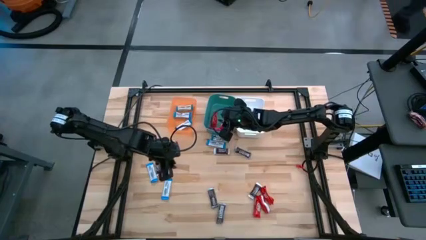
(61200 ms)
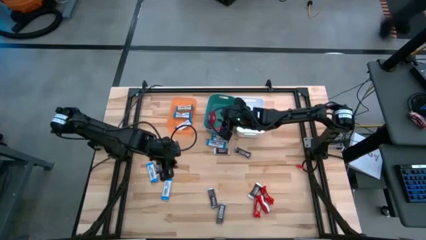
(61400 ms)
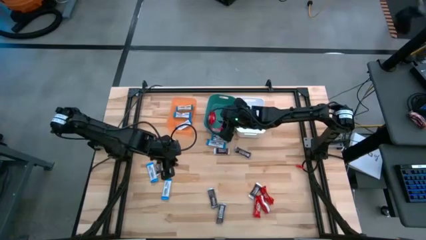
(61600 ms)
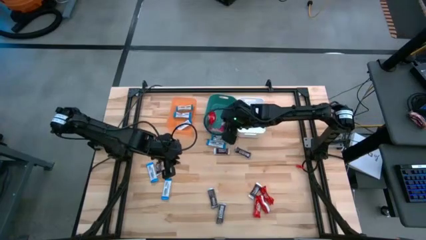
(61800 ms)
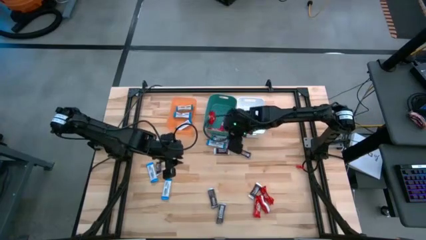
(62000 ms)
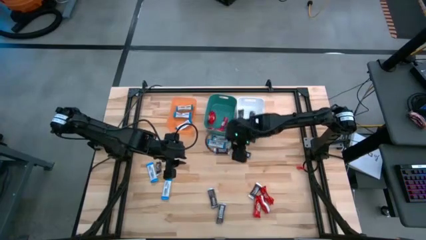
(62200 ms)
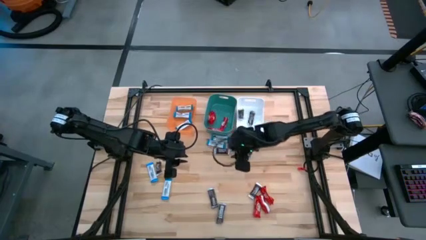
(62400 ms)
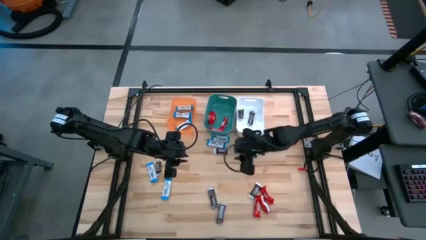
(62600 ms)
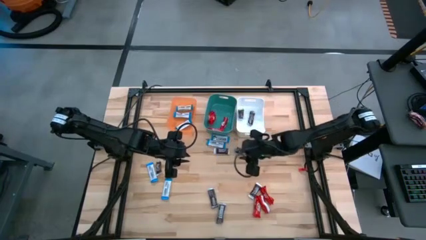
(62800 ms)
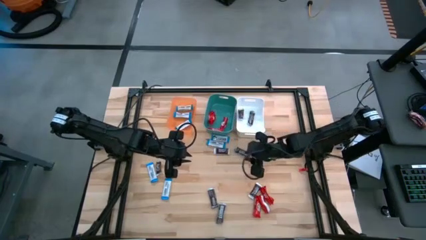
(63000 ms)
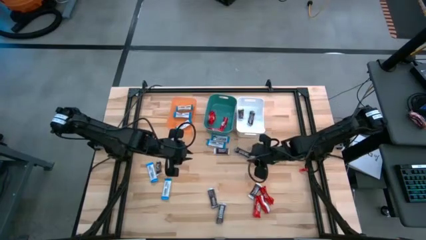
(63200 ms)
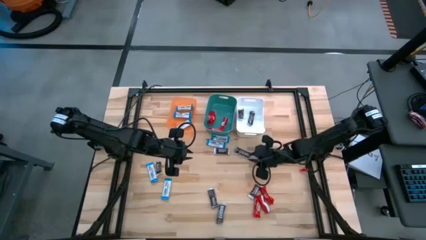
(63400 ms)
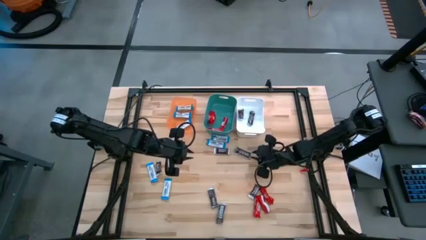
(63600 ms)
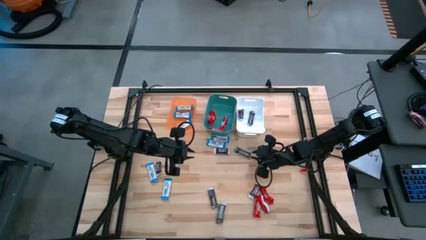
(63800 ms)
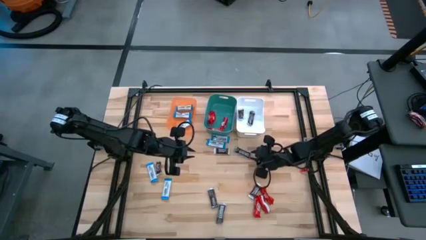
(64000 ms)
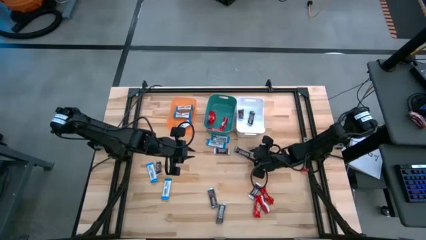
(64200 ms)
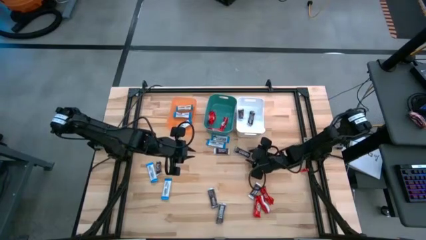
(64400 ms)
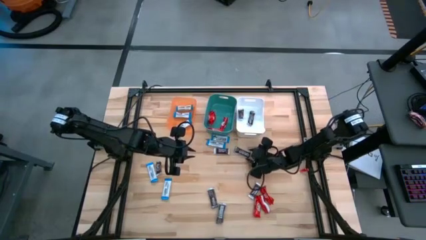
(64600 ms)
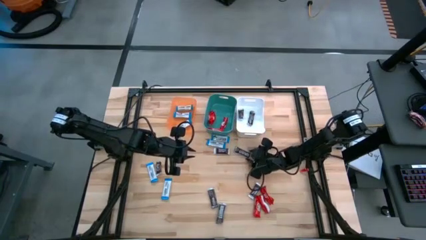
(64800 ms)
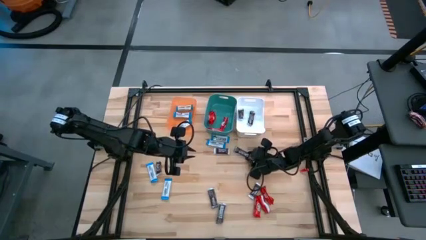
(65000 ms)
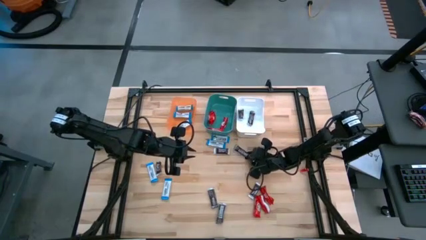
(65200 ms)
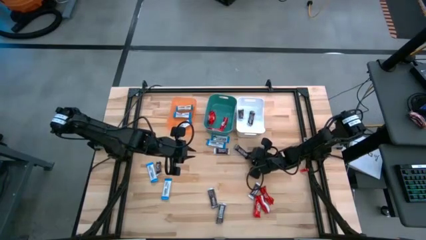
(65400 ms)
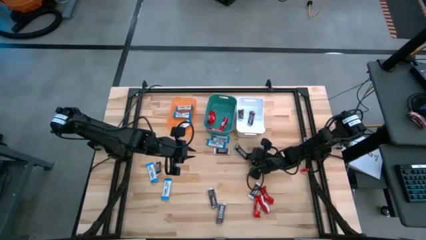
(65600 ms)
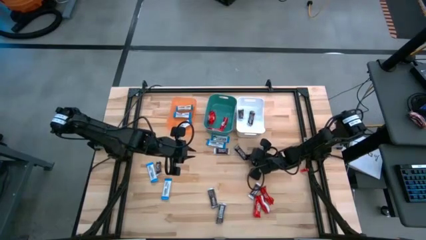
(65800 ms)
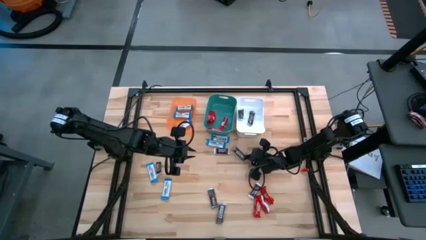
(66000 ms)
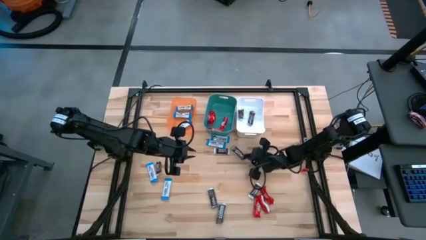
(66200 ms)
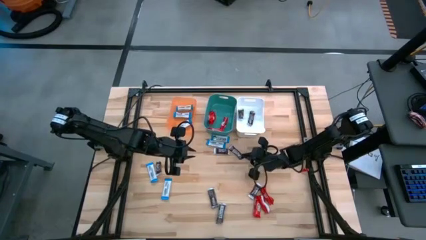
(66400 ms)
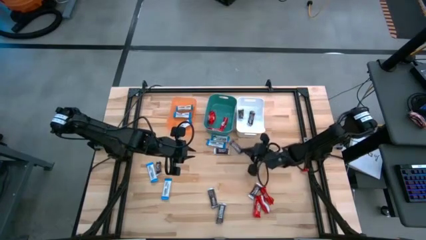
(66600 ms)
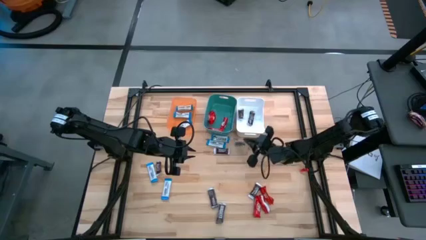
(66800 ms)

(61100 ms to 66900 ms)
Task: Organize candy in baskets
Put the brown chocolate into the white bin

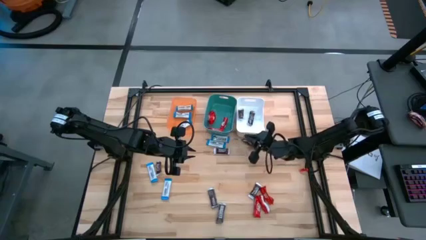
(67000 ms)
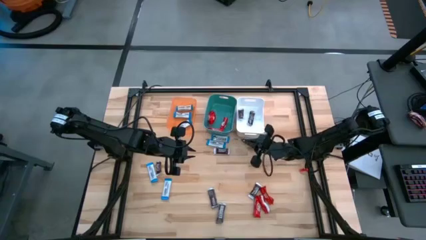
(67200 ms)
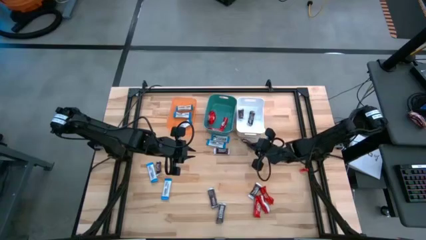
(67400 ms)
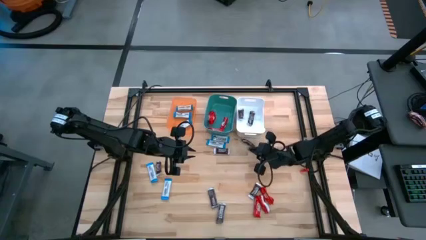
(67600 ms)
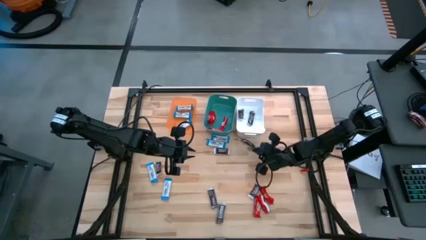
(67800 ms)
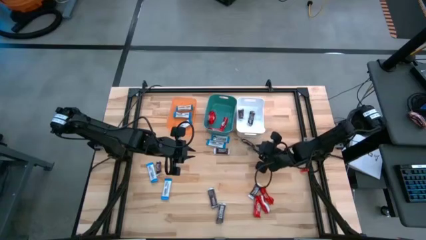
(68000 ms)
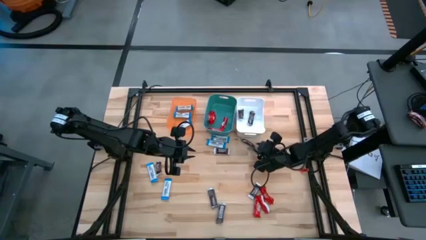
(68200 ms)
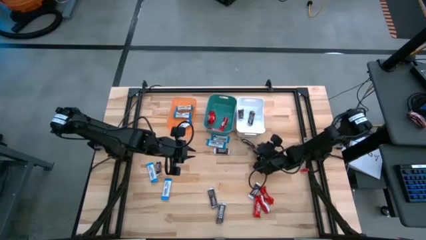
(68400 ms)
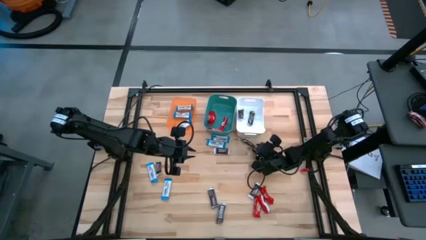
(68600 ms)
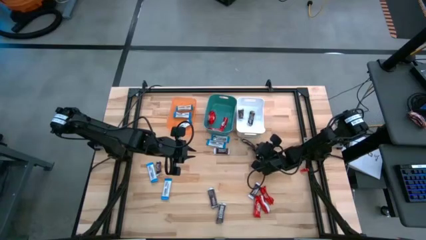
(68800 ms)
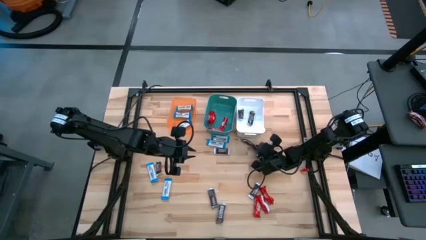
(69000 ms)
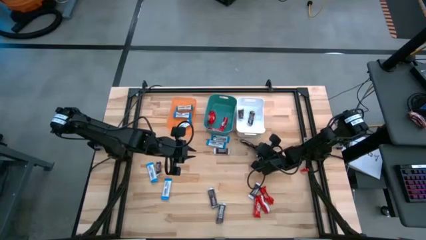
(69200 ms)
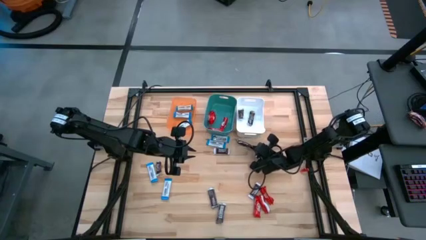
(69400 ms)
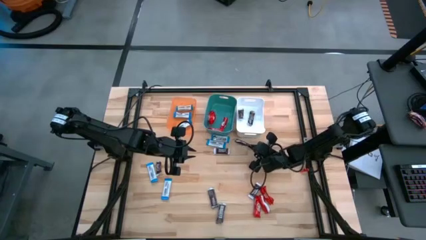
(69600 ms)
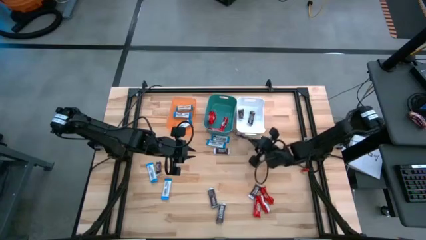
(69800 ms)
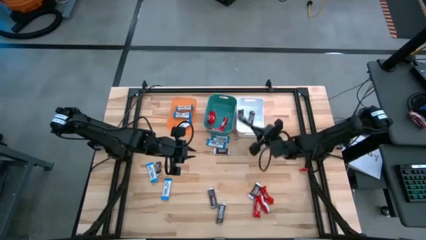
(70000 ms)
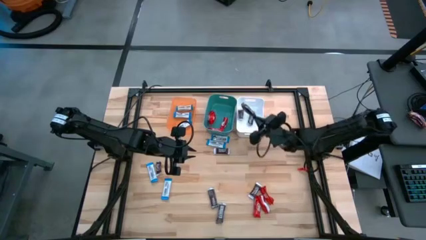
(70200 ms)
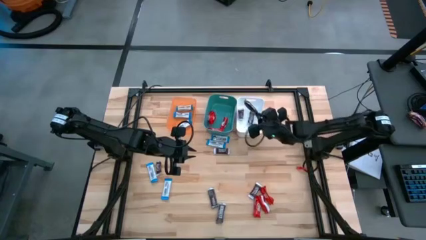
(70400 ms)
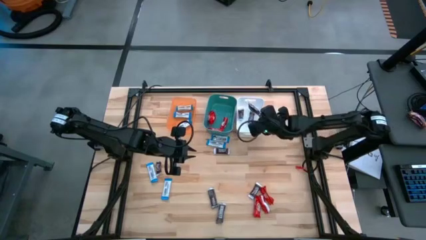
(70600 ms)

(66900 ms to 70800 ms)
Put the brown chocolate into the white bin

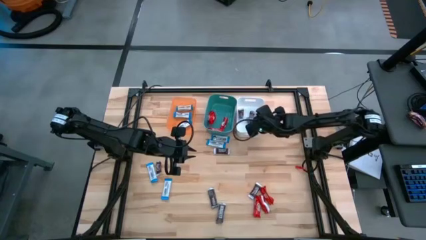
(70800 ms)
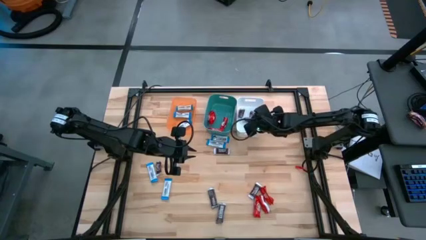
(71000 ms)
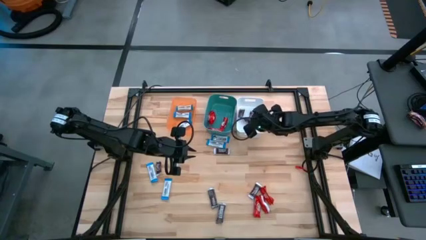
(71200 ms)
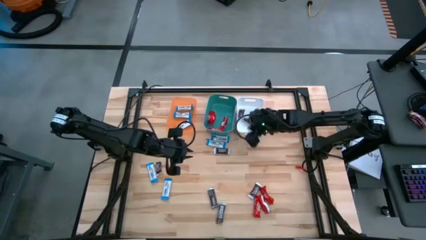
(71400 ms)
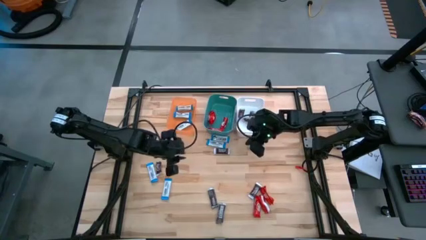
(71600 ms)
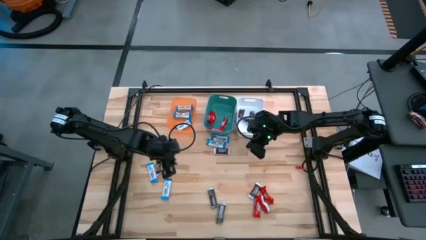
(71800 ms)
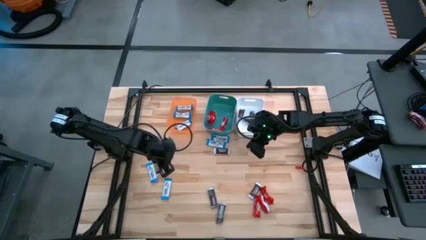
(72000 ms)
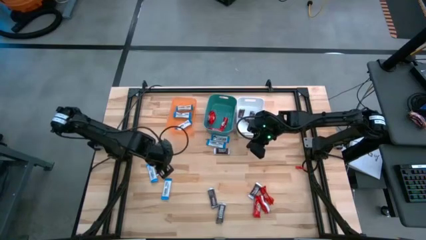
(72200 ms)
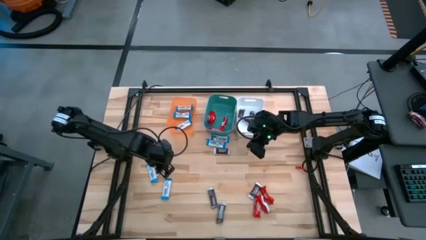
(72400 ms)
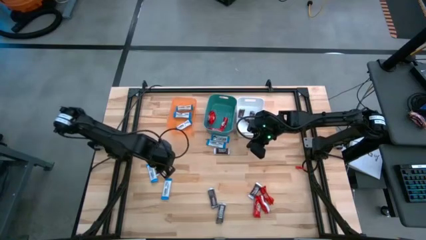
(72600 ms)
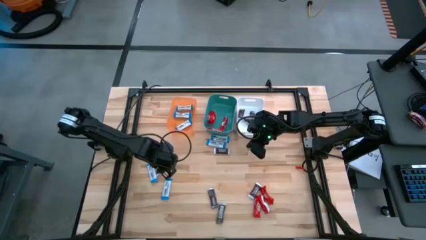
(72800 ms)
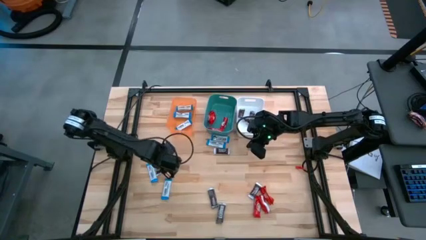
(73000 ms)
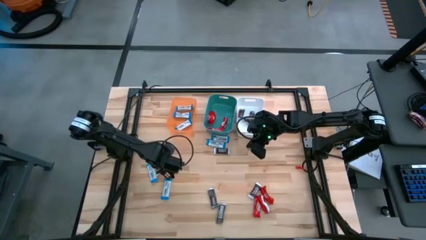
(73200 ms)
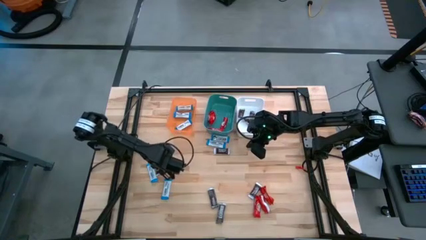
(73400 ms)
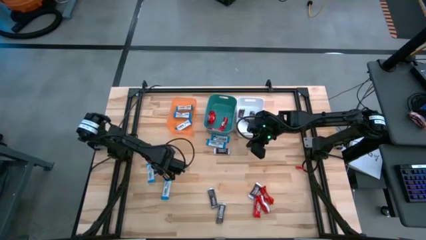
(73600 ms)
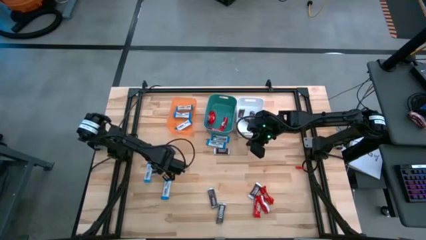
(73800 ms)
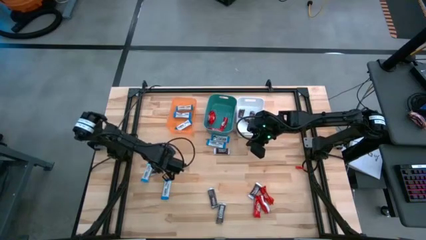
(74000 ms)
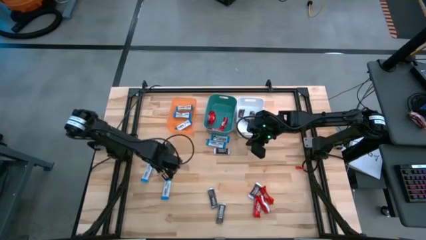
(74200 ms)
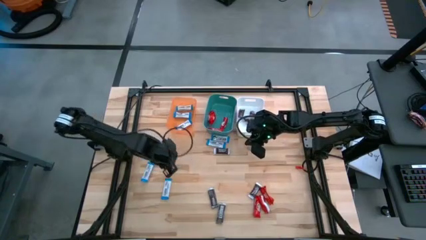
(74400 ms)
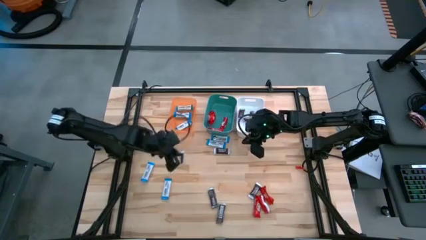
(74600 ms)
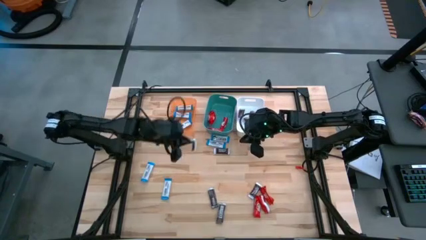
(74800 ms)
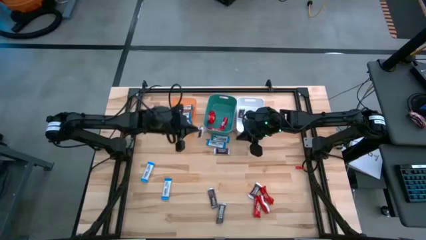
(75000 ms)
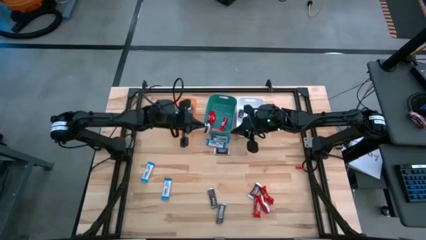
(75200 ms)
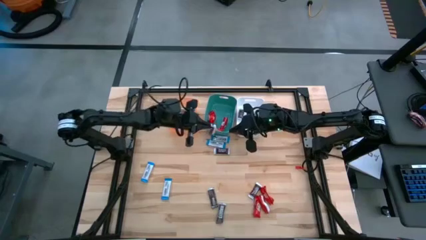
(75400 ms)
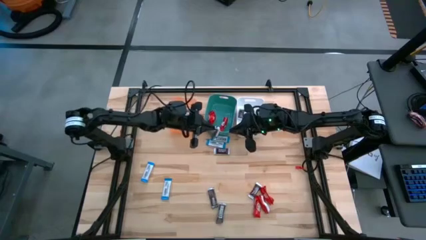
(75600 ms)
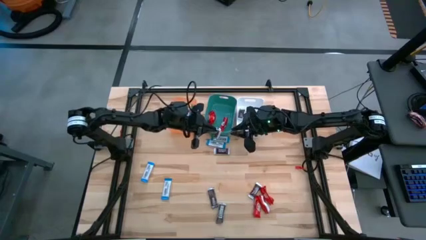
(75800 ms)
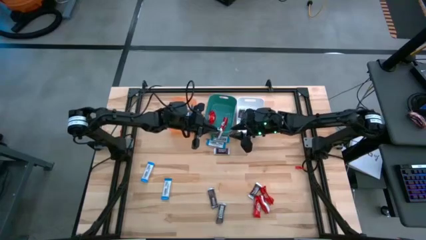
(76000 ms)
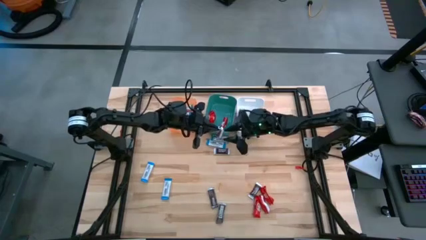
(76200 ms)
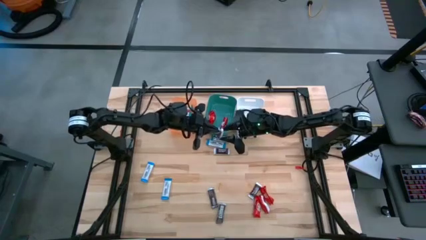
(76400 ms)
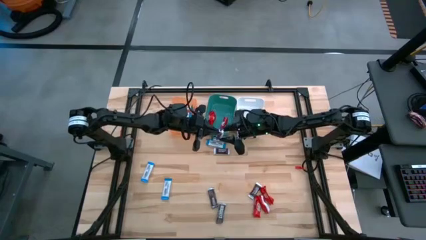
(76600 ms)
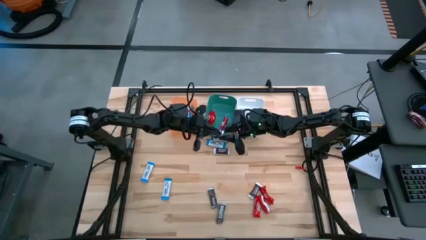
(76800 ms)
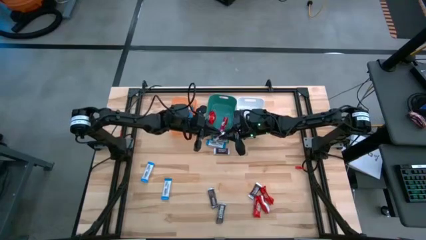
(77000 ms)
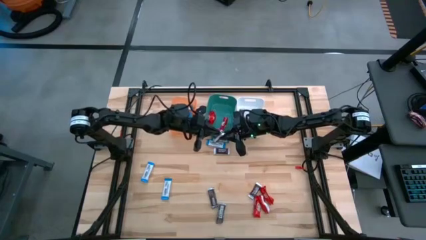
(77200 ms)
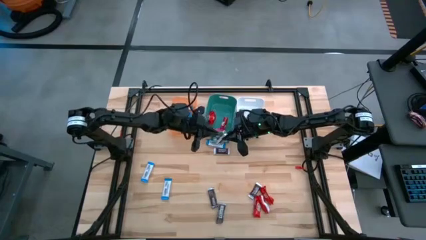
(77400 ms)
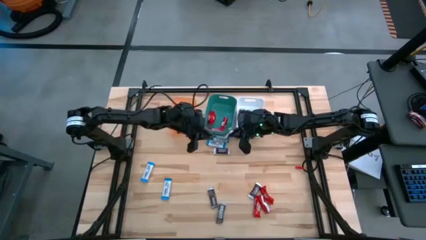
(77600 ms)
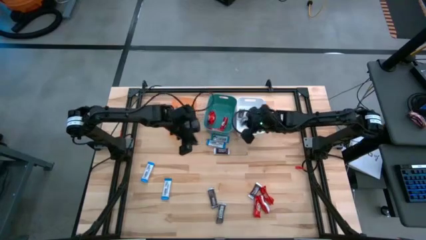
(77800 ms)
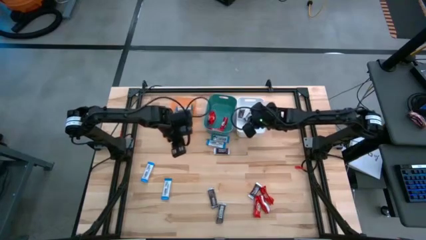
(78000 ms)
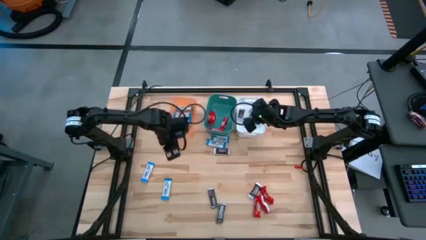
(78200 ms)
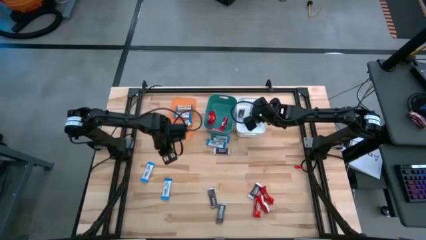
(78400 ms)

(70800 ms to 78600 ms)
Put the brown chocolate into the white bin
